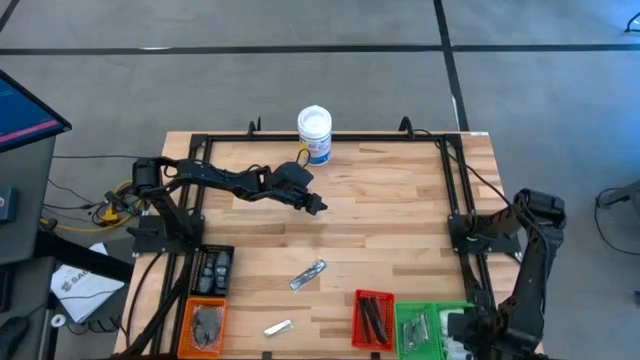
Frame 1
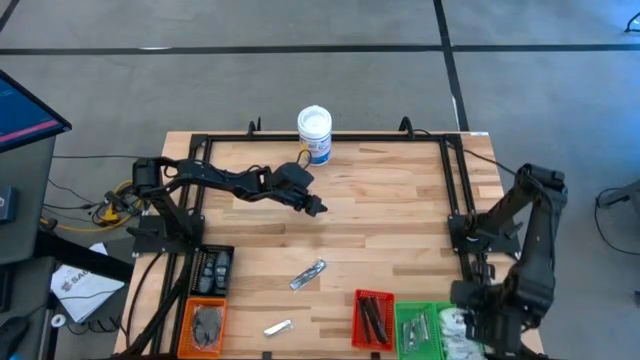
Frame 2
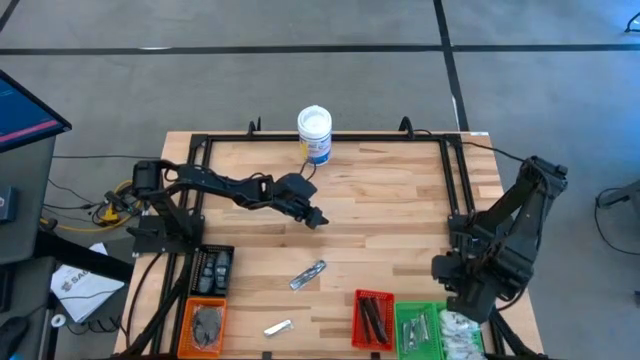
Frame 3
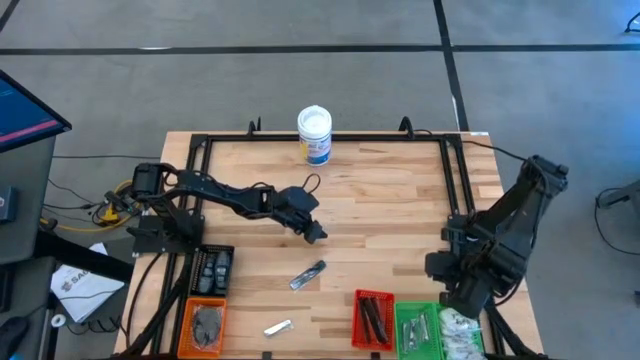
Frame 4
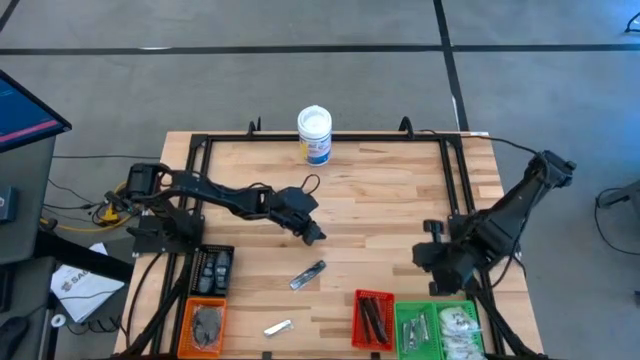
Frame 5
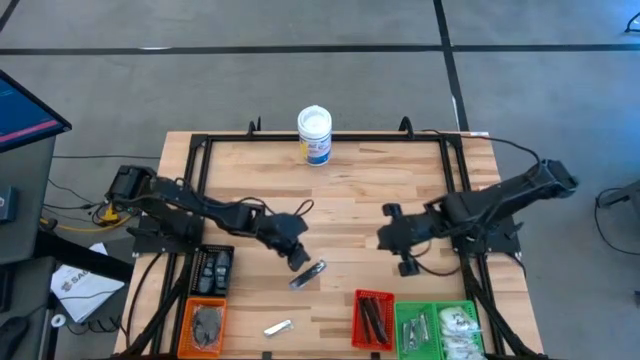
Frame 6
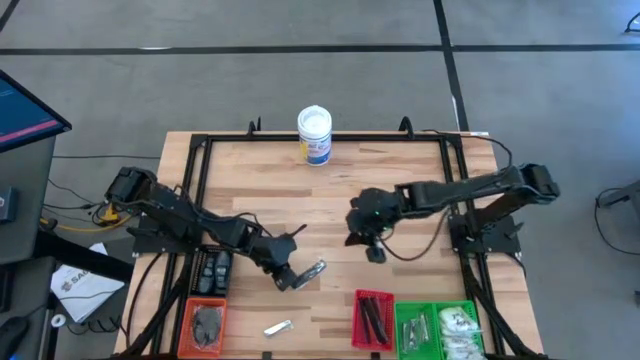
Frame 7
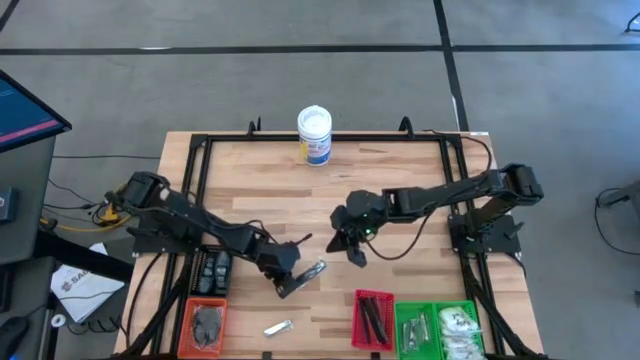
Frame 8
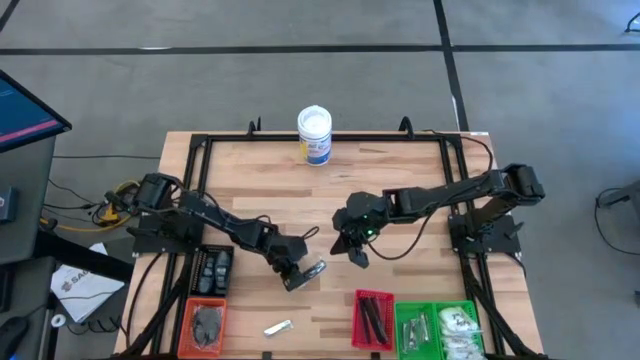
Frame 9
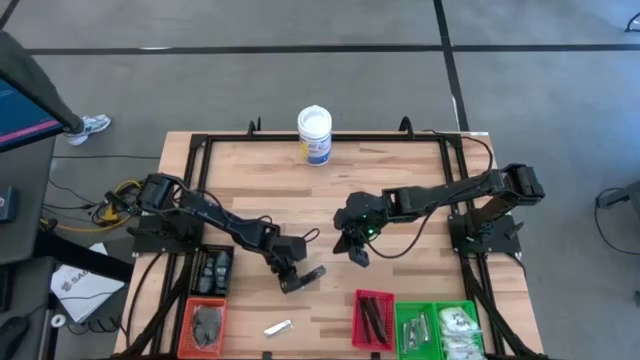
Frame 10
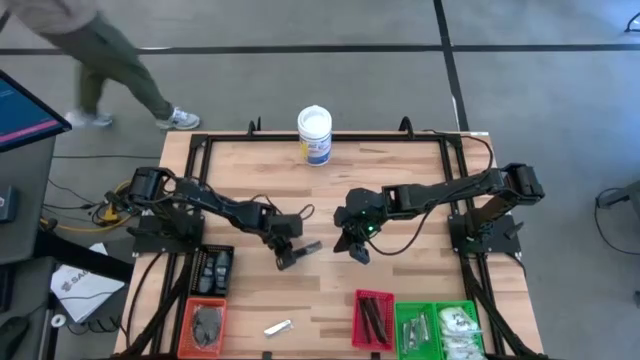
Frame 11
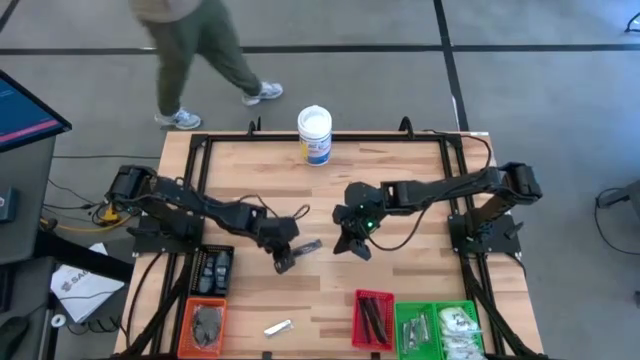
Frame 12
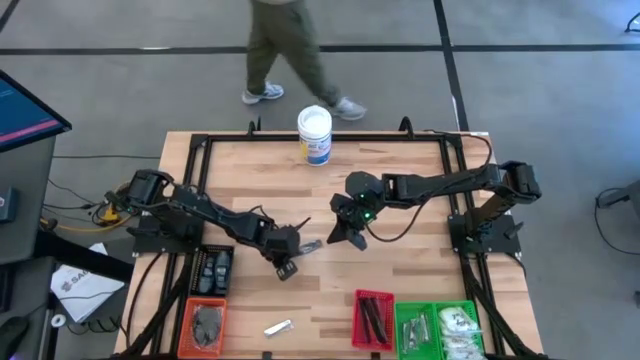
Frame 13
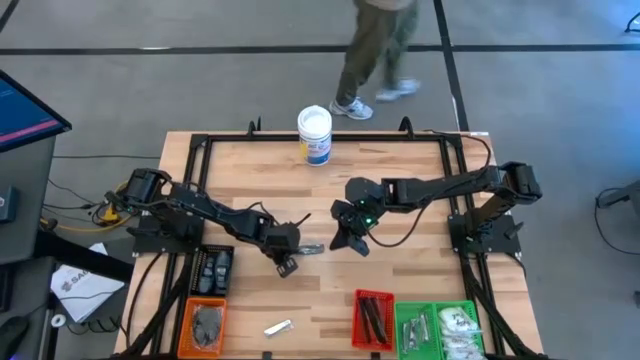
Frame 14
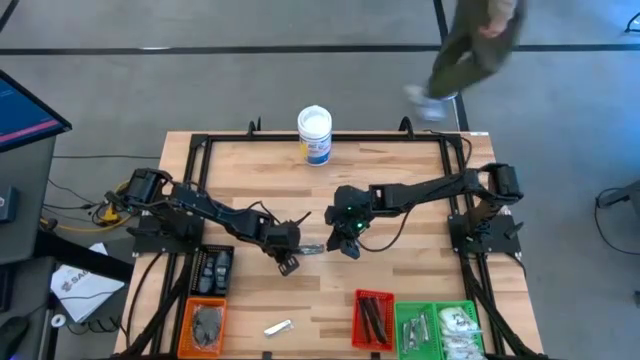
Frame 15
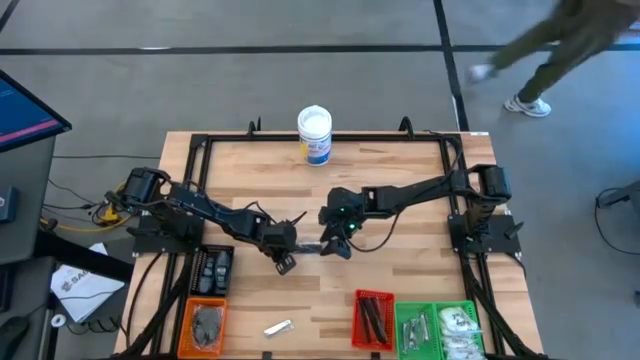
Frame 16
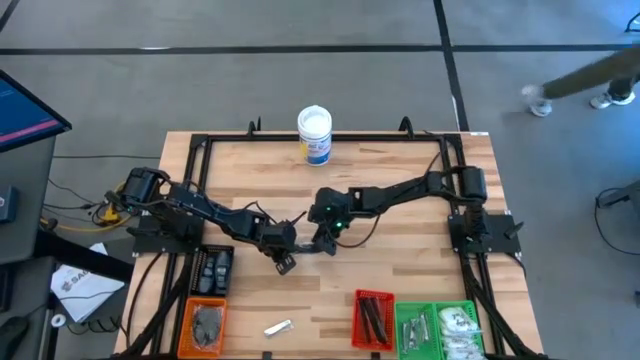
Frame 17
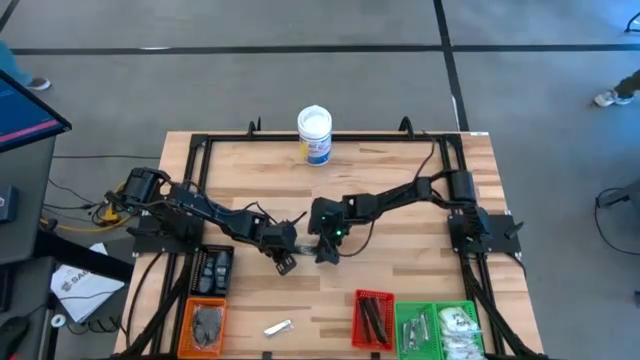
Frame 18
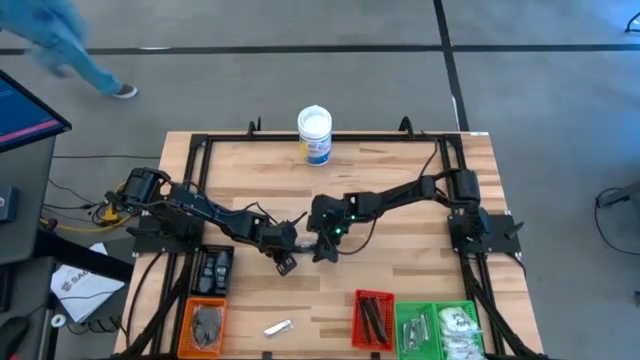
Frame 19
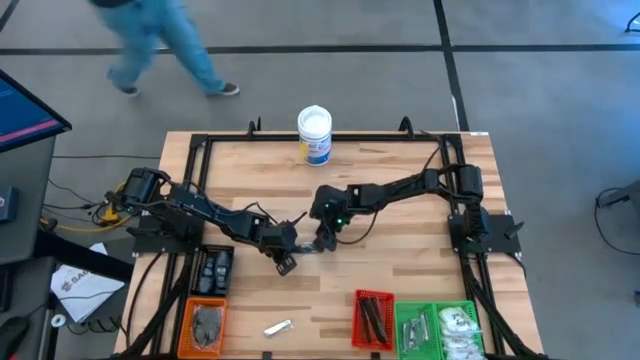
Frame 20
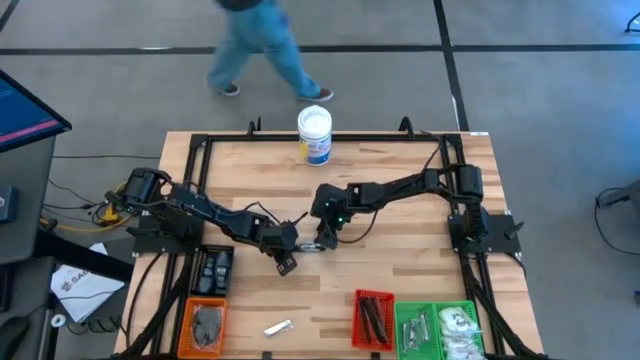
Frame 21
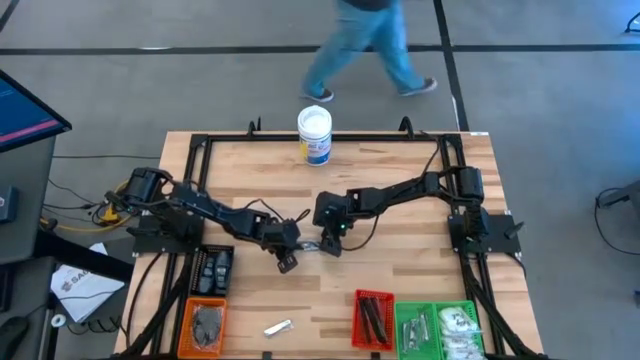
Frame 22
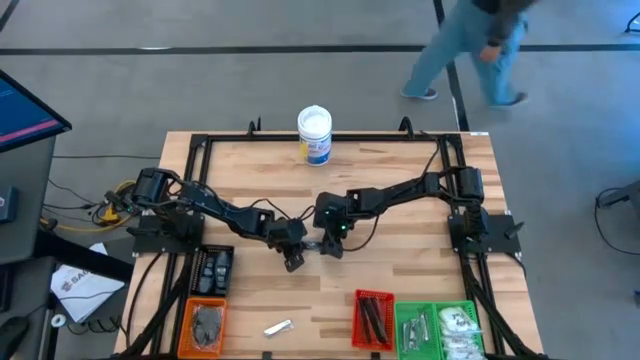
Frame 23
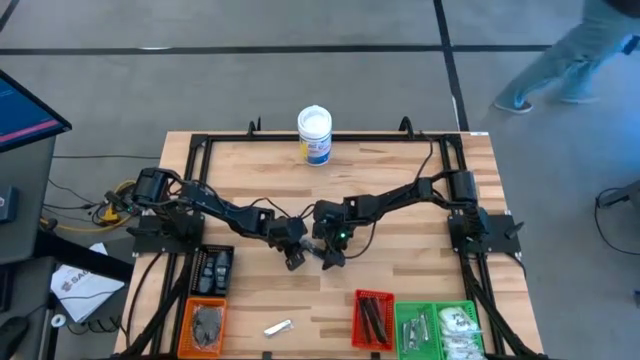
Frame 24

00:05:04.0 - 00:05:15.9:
Task: Pick & Place Travel size toiletries
Put the black comb into the red bin

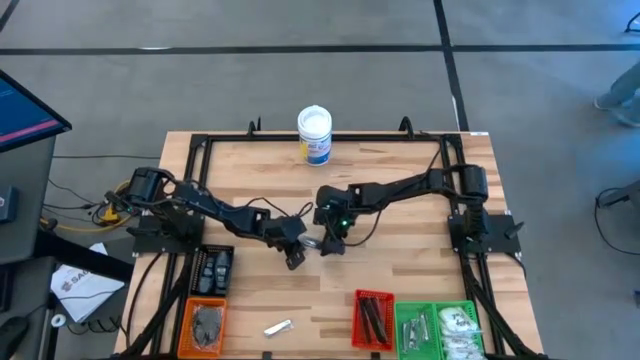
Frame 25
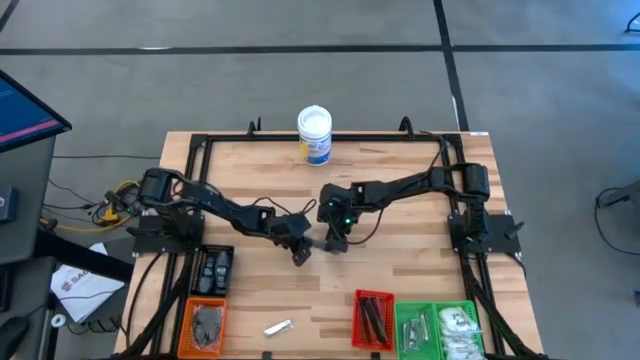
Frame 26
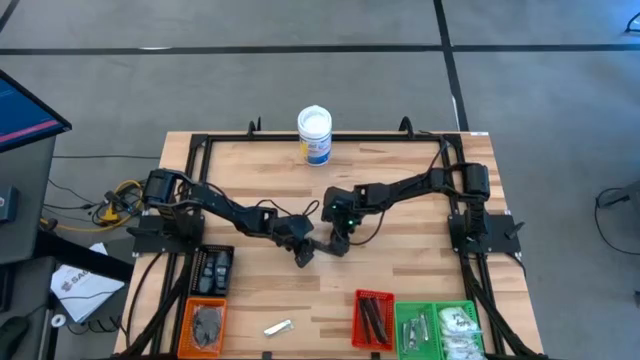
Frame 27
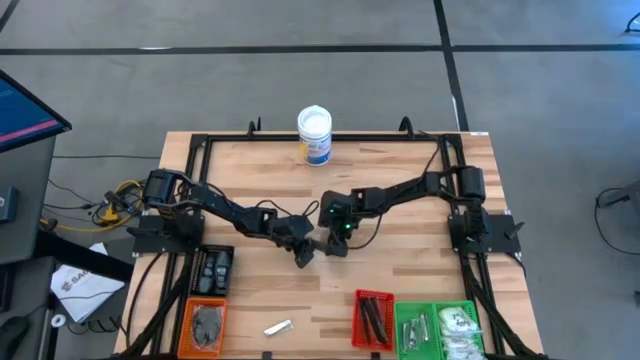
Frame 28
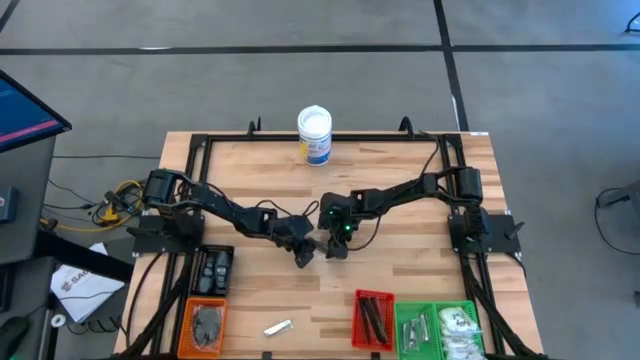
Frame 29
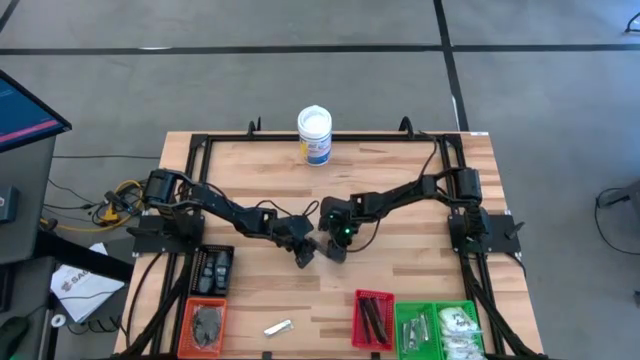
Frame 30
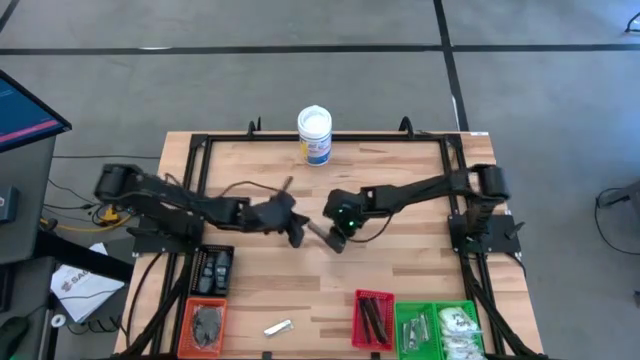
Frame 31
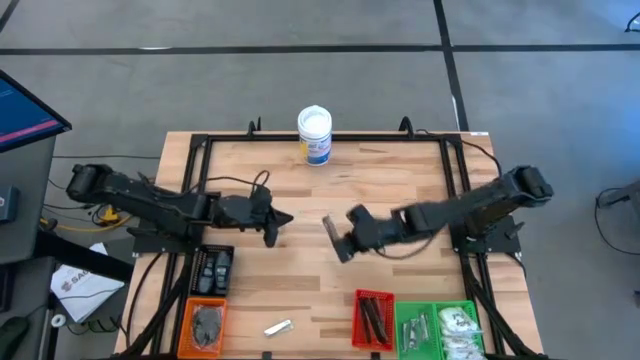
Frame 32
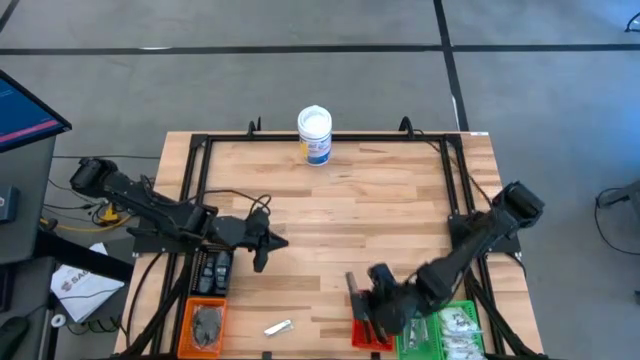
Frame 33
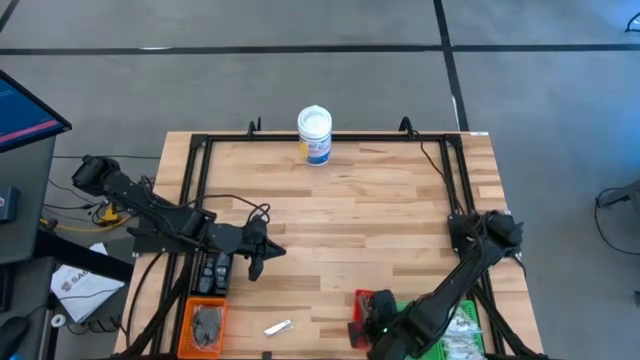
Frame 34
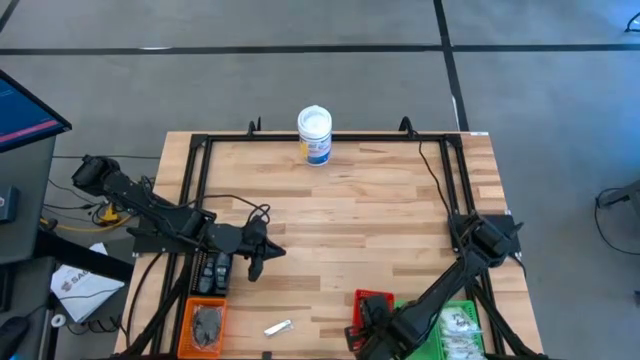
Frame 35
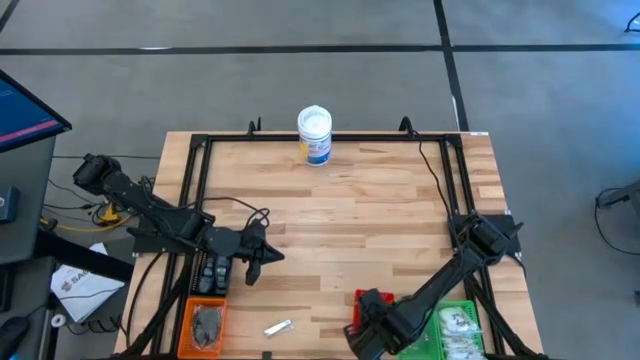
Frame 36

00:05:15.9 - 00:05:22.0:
Put the black comb into the red bin
